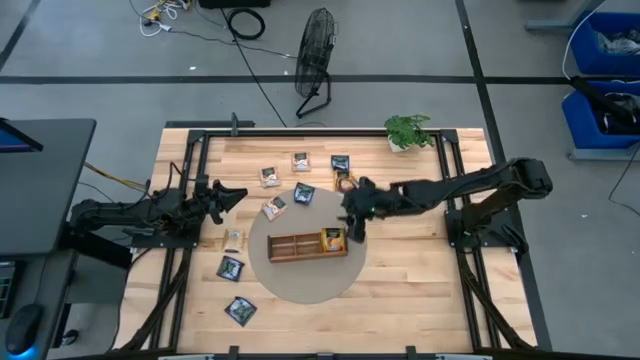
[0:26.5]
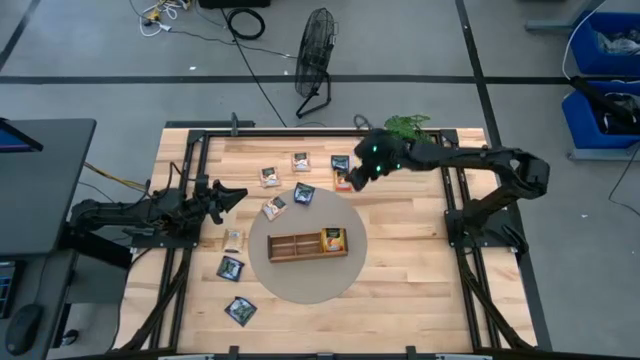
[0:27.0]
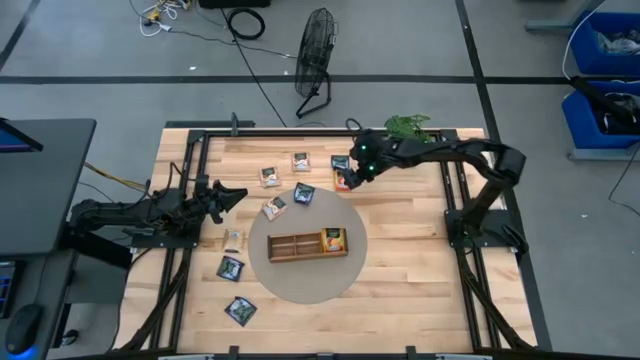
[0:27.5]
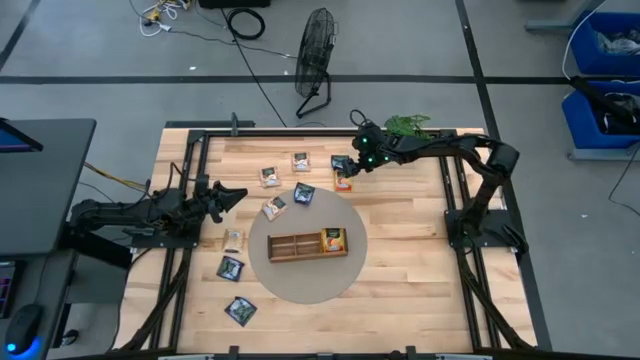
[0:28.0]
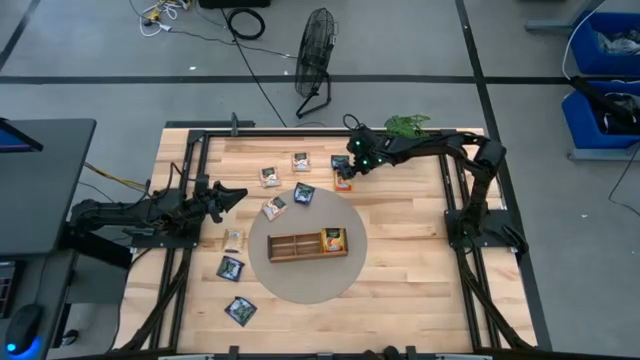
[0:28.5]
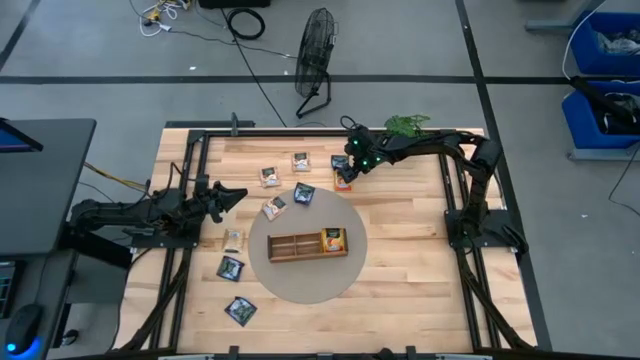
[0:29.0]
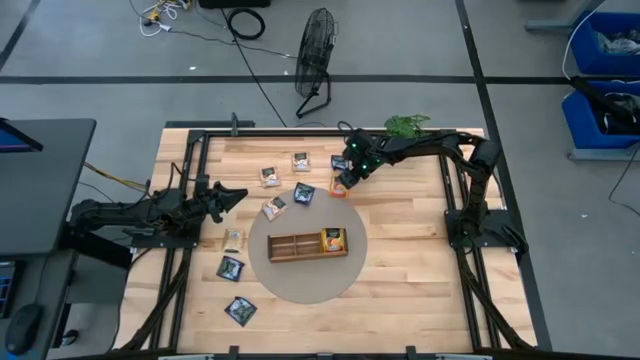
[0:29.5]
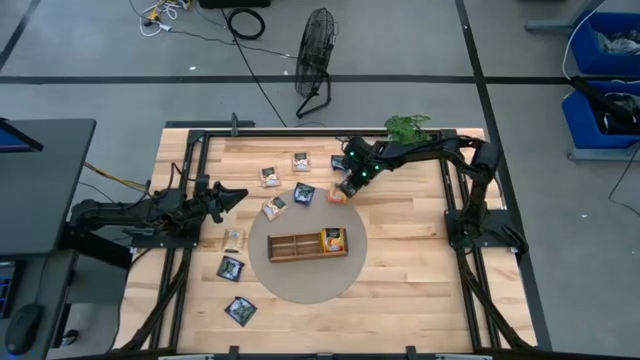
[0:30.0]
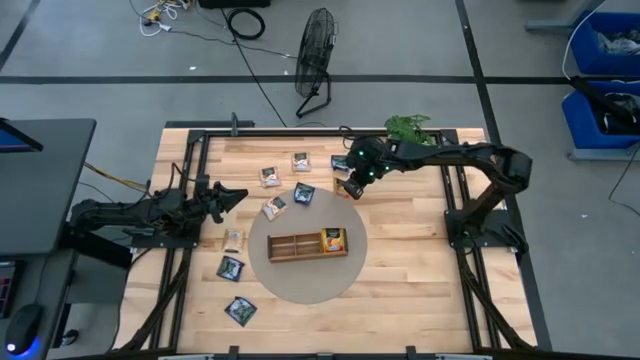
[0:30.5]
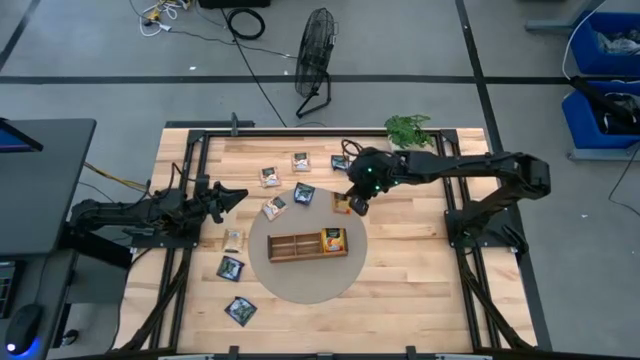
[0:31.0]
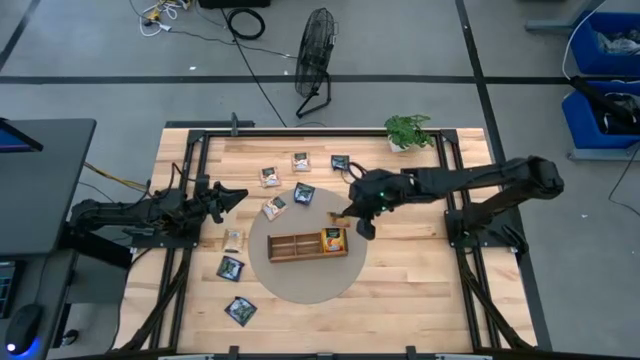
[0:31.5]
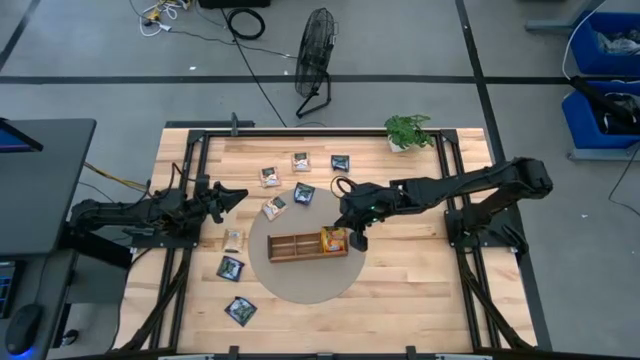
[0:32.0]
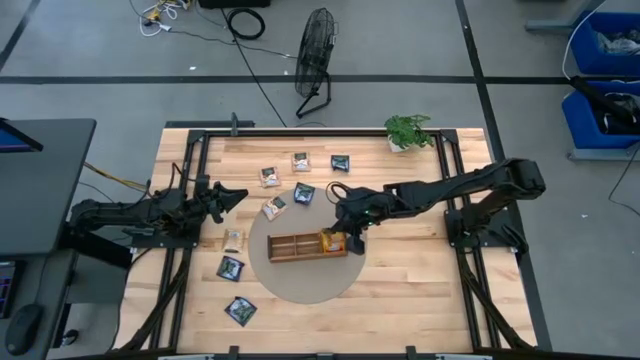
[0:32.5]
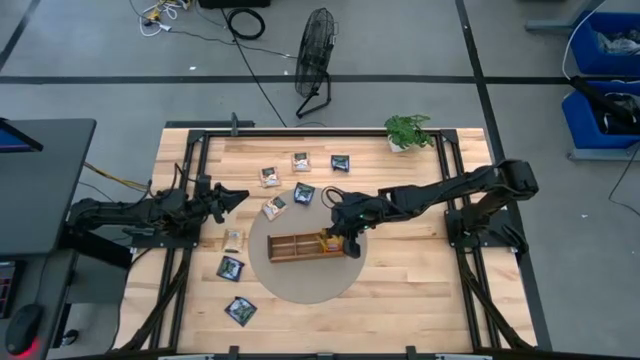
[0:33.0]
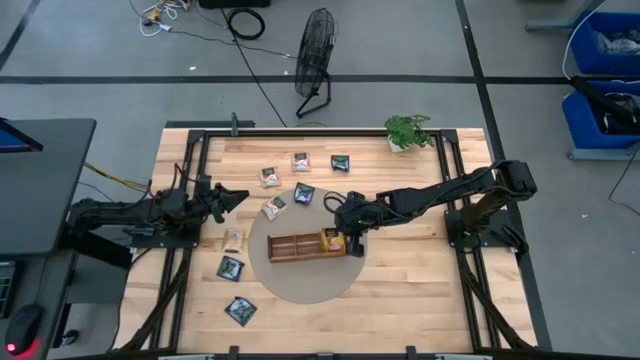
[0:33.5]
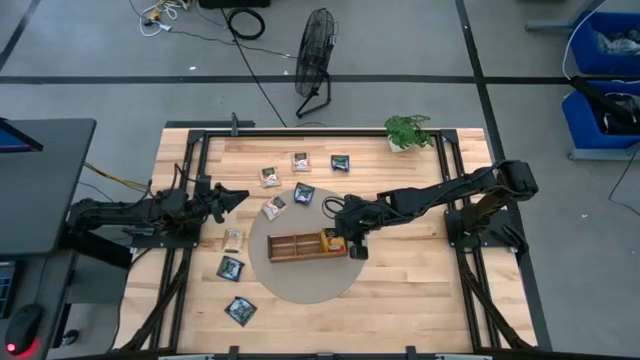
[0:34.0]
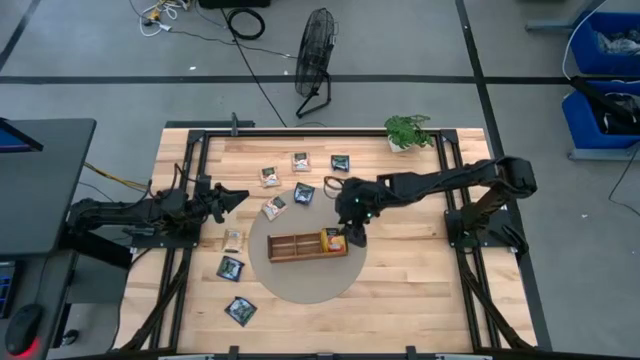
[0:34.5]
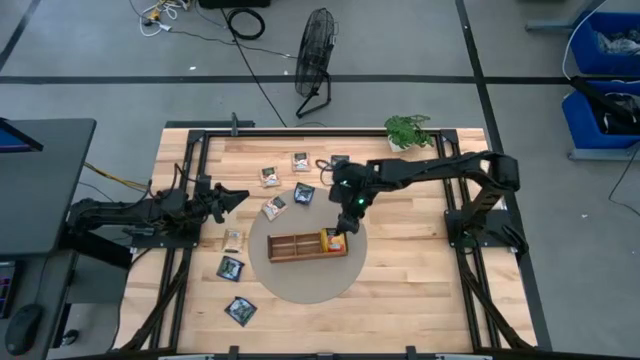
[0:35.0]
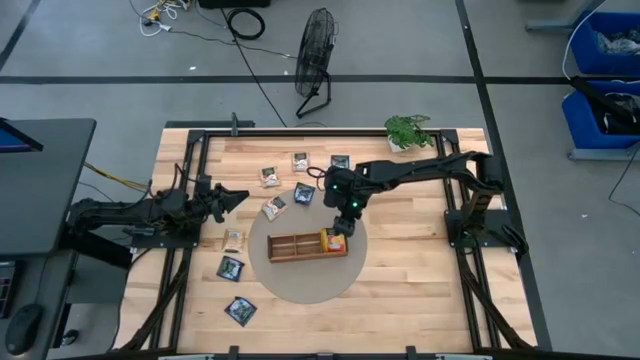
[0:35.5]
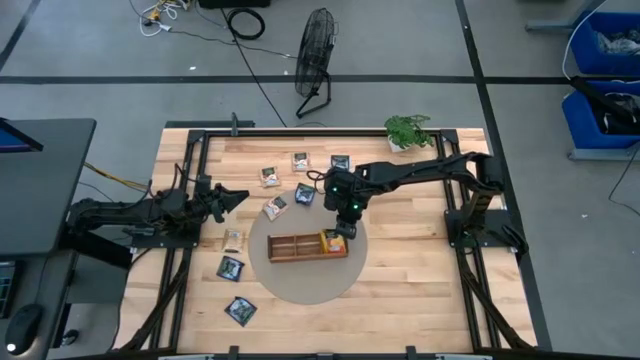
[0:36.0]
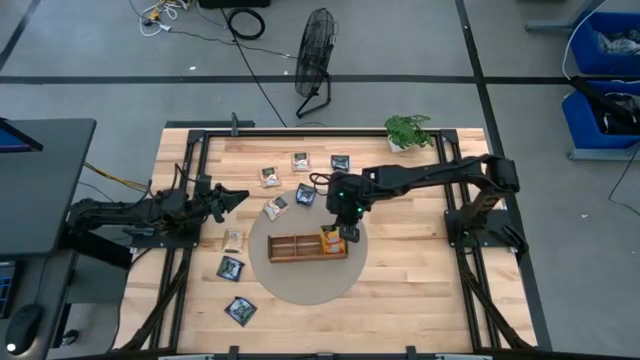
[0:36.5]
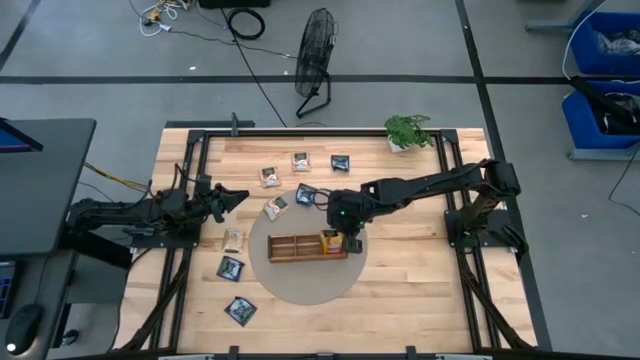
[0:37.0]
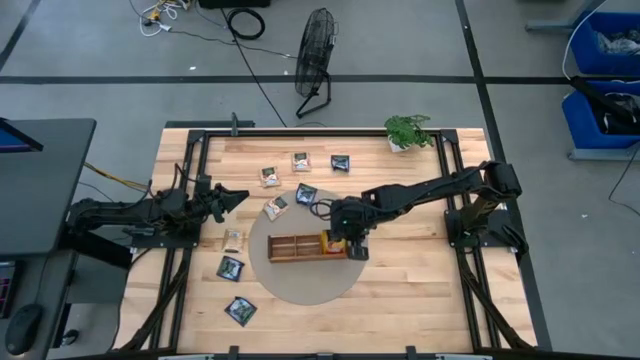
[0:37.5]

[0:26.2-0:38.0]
Task: Pick & Place Tea
Put the orange tea bag into the right section of the wooden organizer

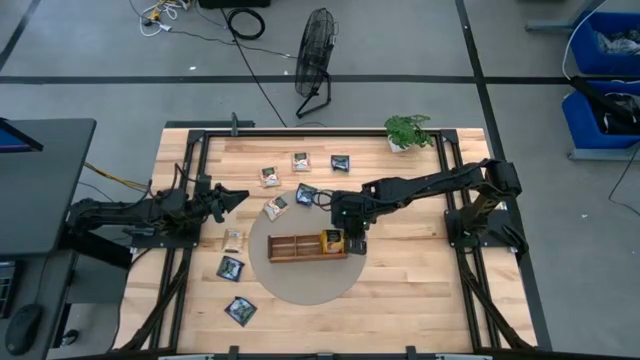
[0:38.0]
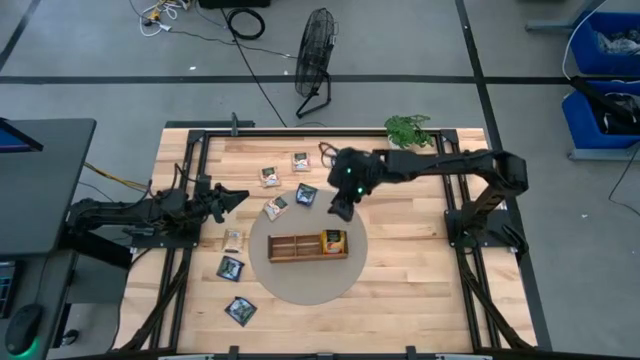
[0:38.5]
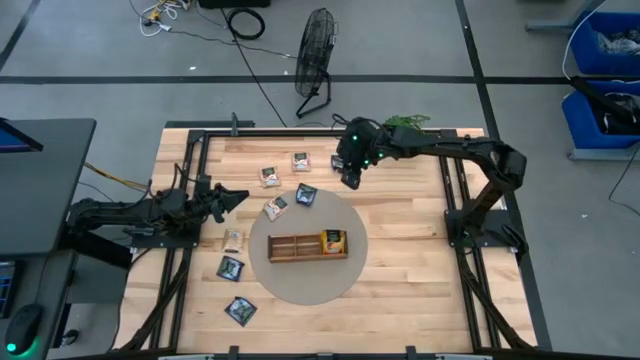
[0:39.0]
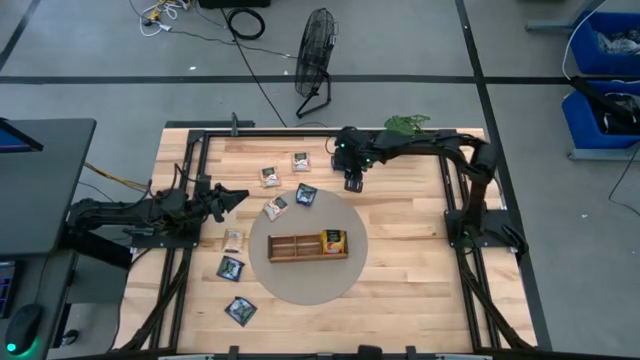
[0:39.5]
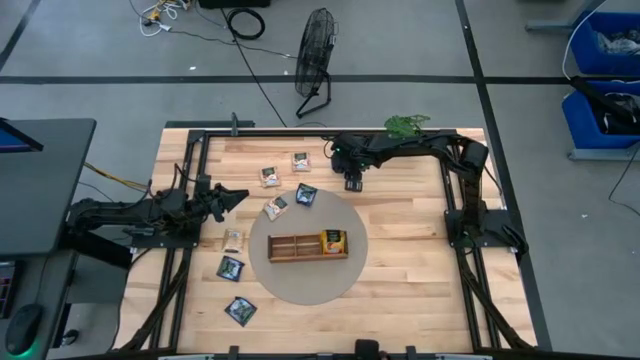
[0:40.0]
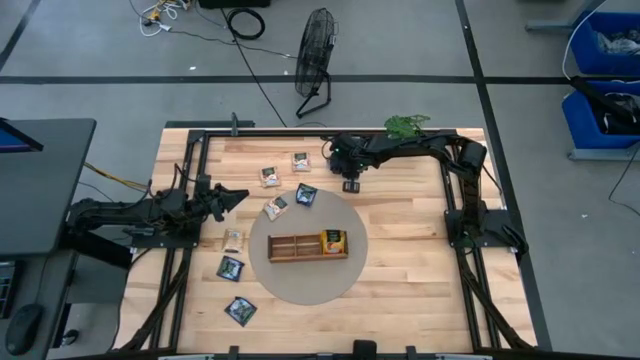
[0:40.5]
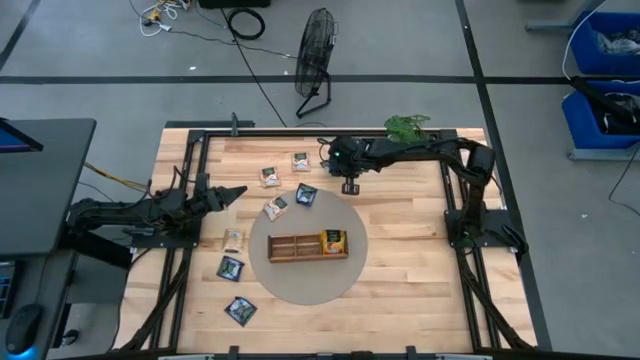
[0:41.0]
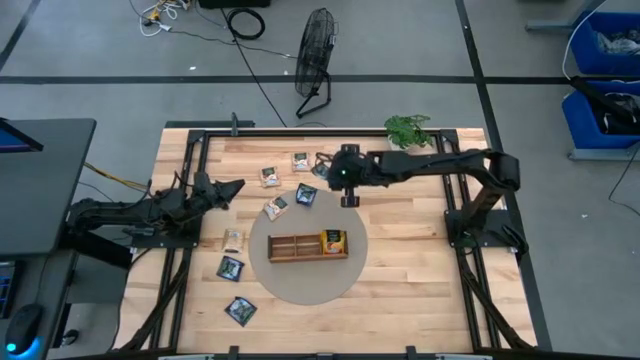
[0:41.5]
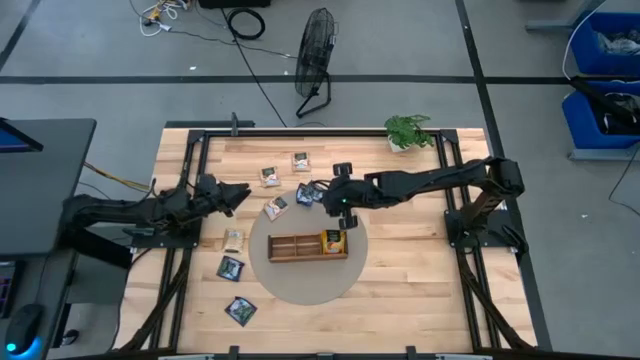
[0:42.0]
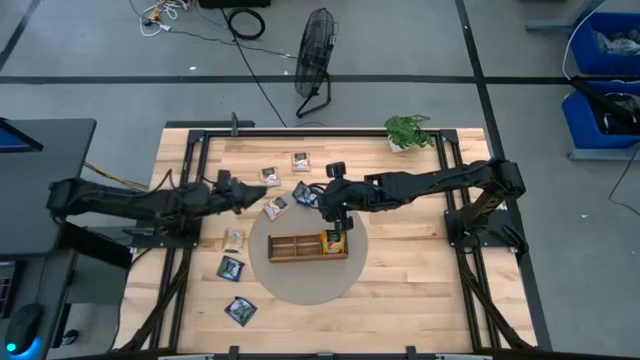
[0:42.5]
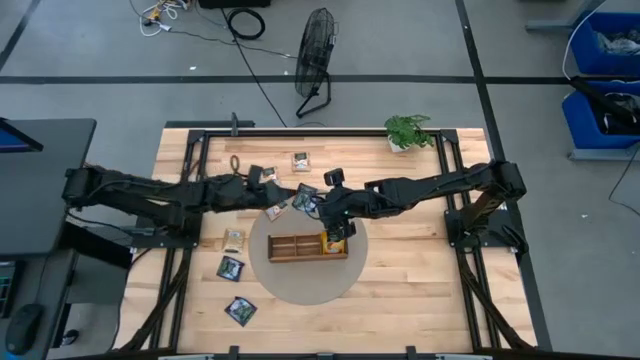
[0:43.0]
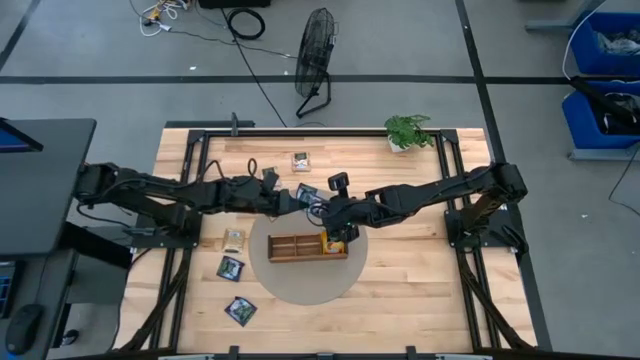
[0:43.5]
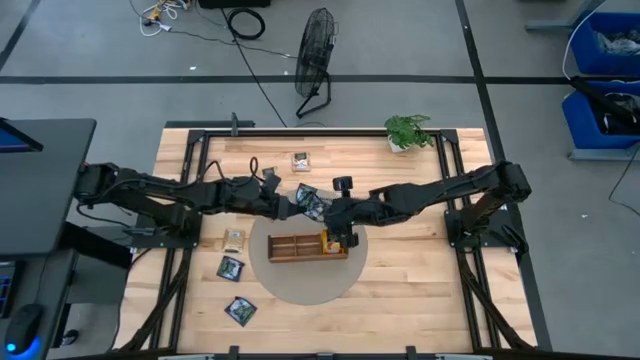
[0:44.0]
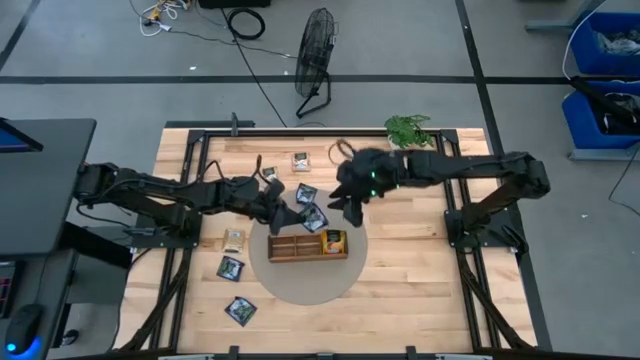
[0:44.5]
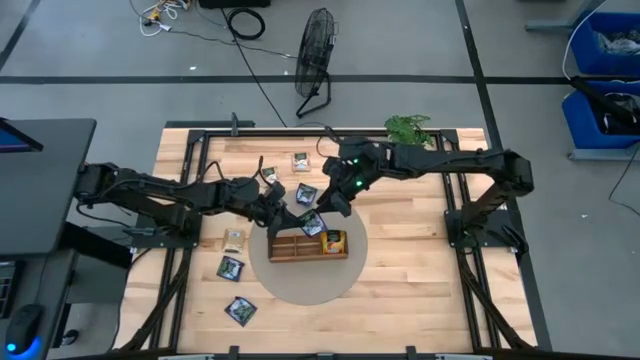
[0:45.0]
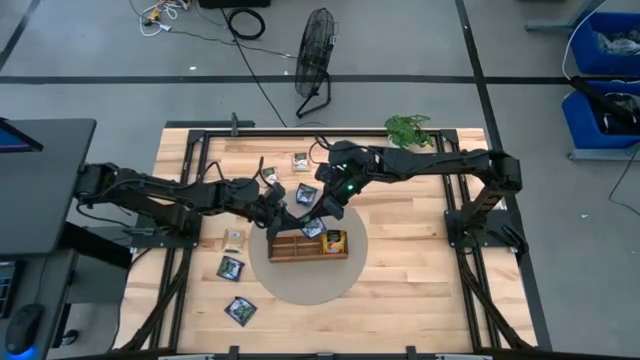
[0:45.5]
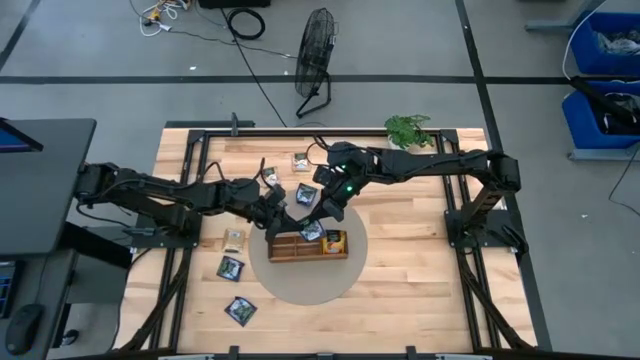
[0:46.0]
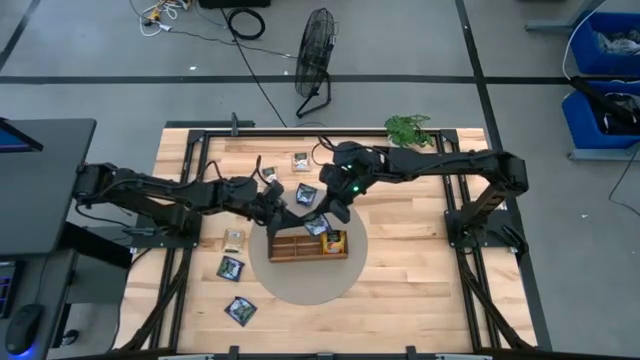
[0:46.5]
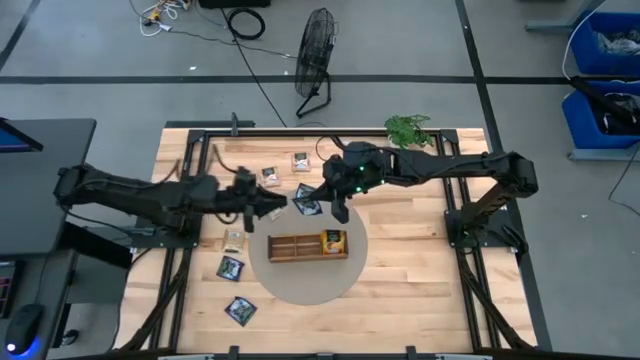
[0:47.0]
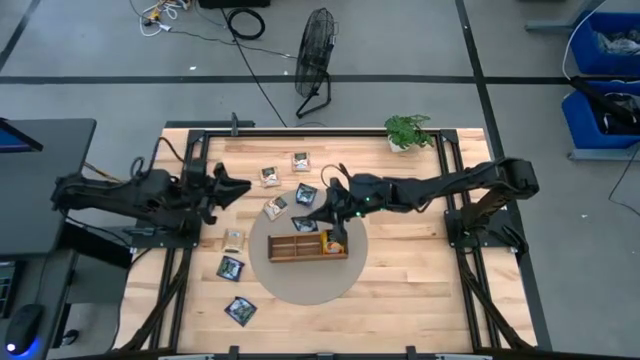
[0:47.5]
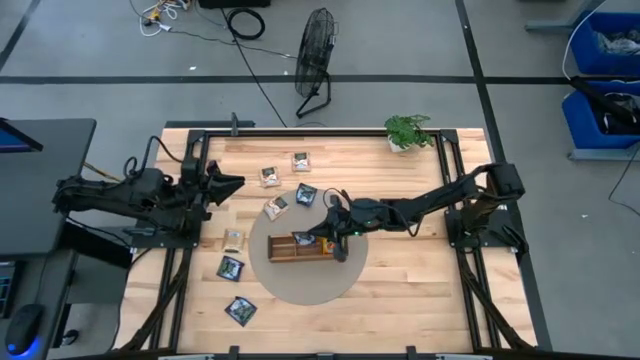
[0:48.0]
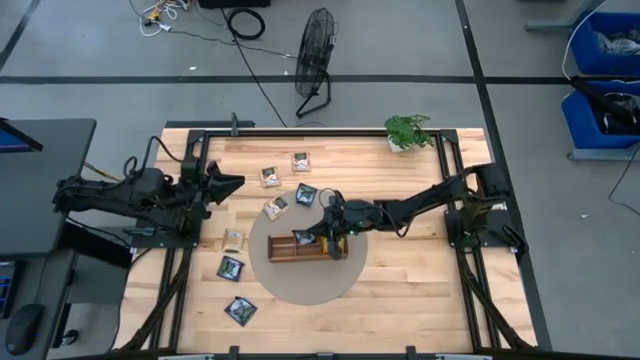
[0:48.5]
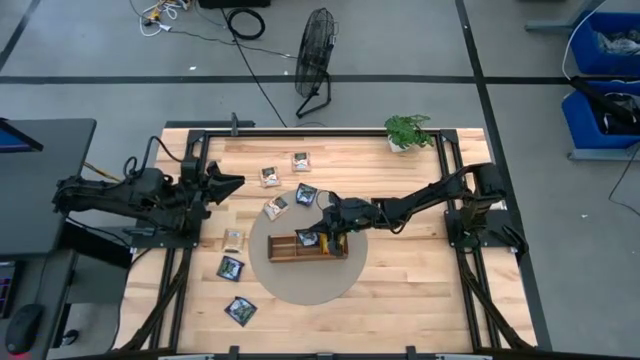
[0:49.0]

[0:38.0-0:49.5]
Put the violet tea bag into the middle section of the wooden organizer
